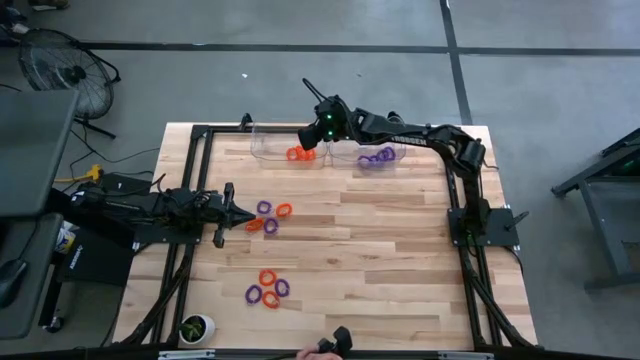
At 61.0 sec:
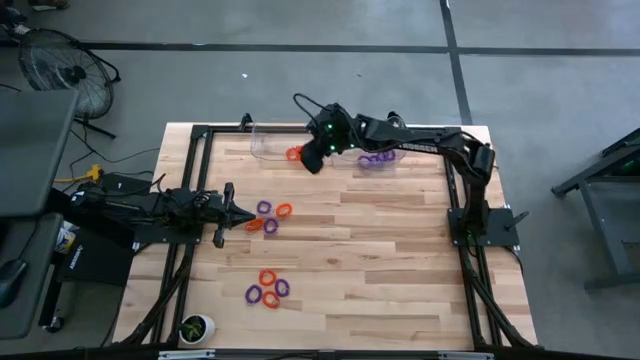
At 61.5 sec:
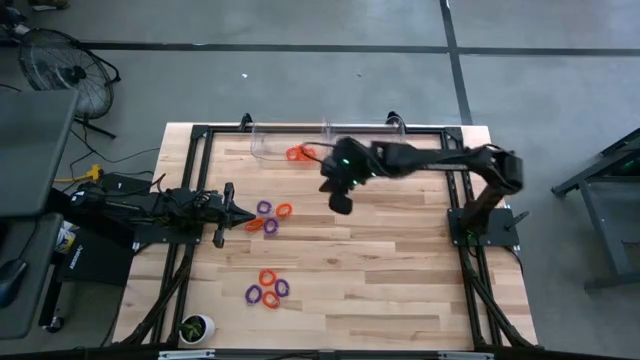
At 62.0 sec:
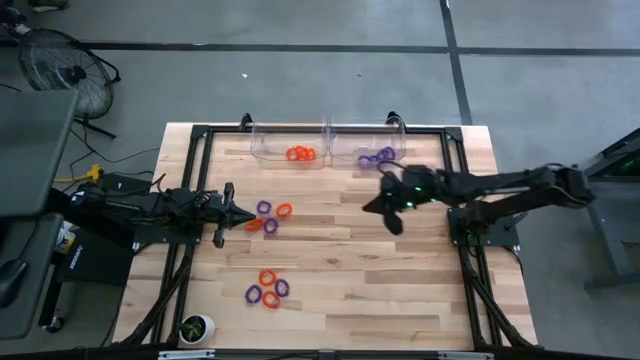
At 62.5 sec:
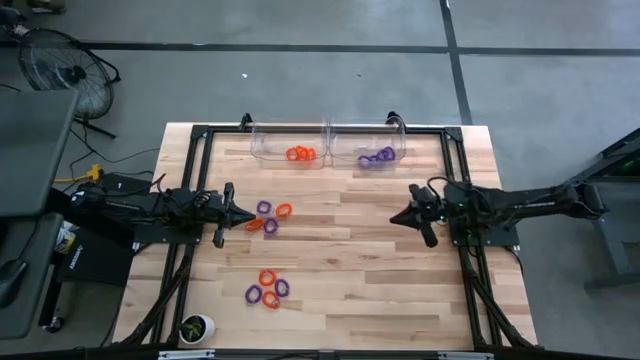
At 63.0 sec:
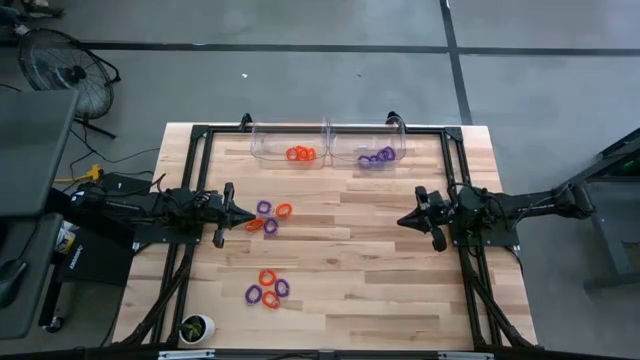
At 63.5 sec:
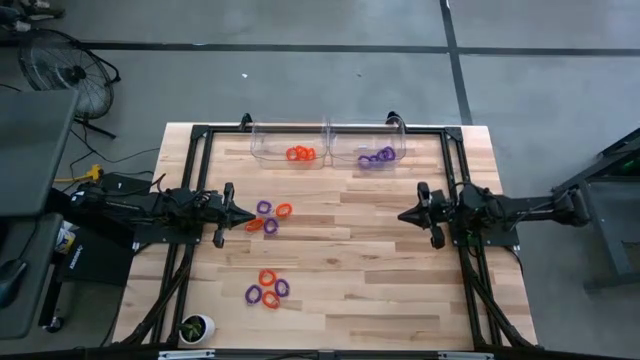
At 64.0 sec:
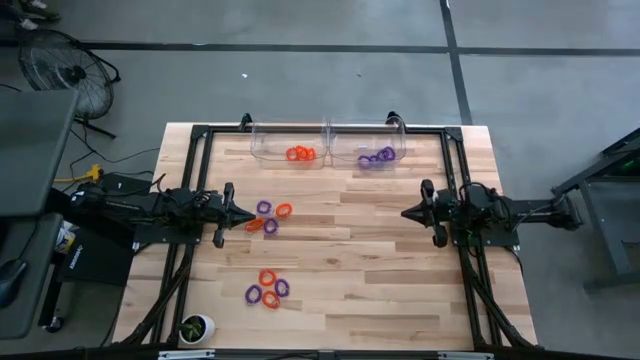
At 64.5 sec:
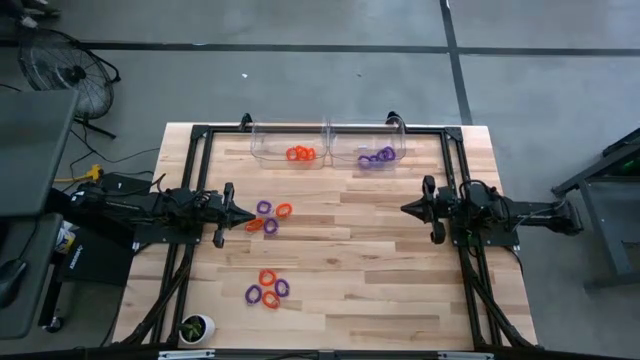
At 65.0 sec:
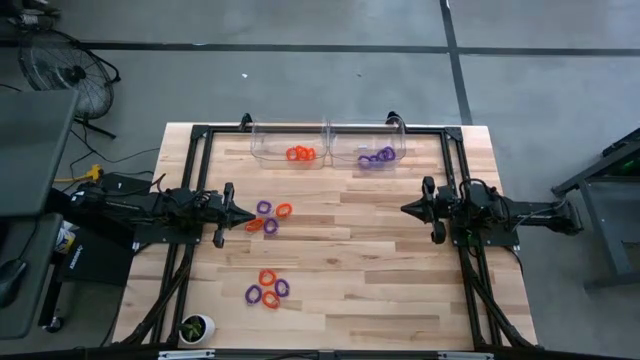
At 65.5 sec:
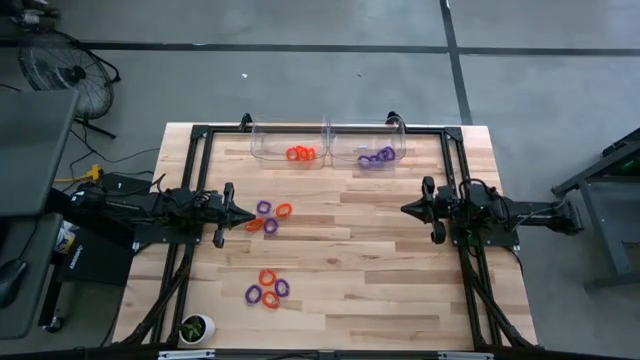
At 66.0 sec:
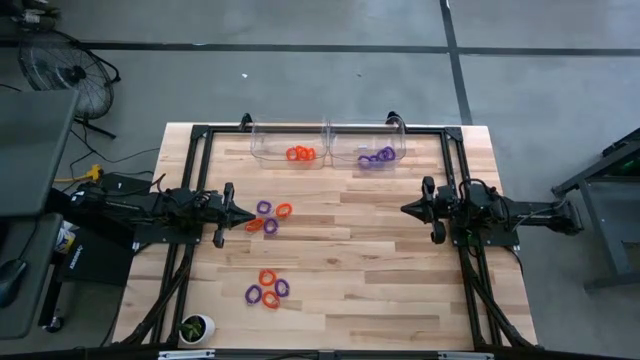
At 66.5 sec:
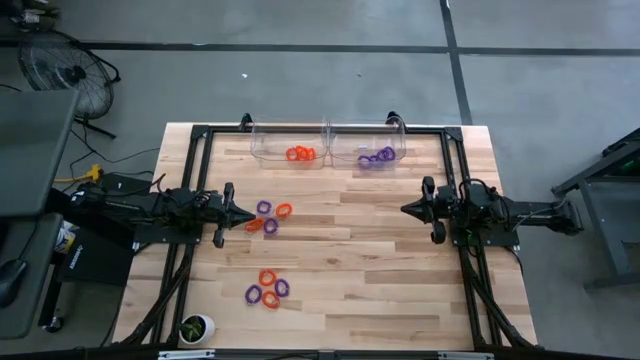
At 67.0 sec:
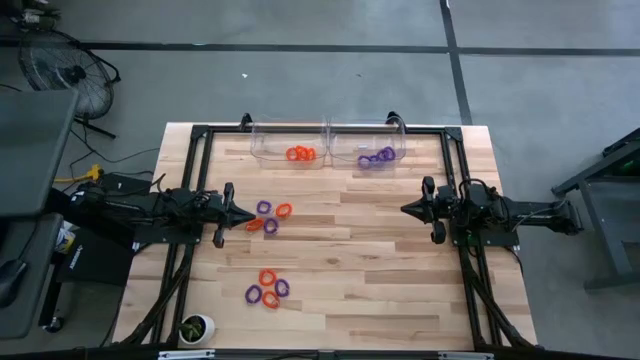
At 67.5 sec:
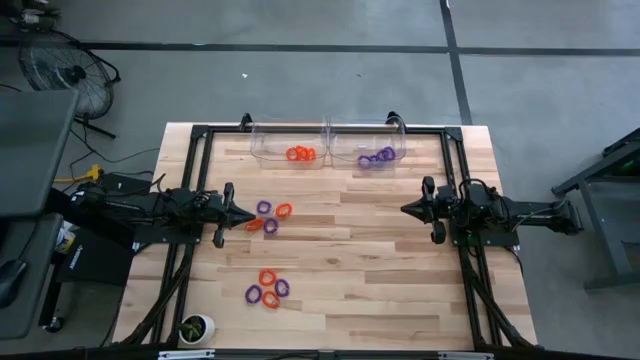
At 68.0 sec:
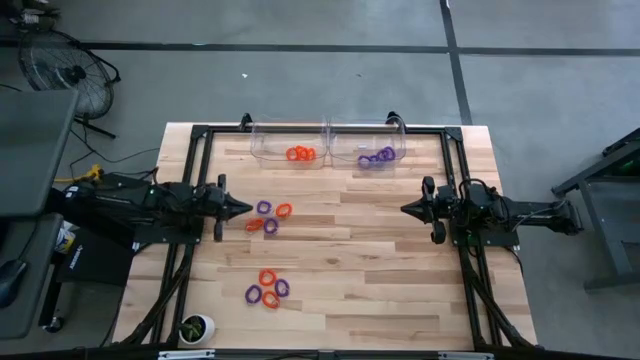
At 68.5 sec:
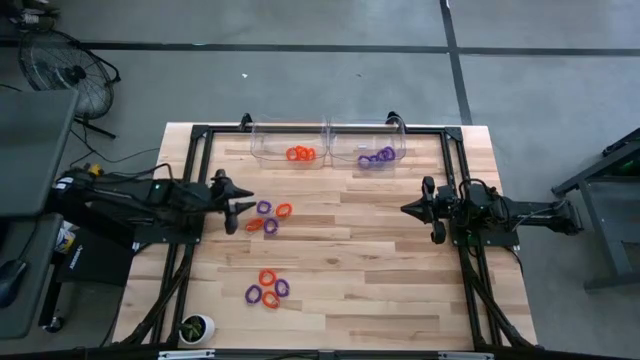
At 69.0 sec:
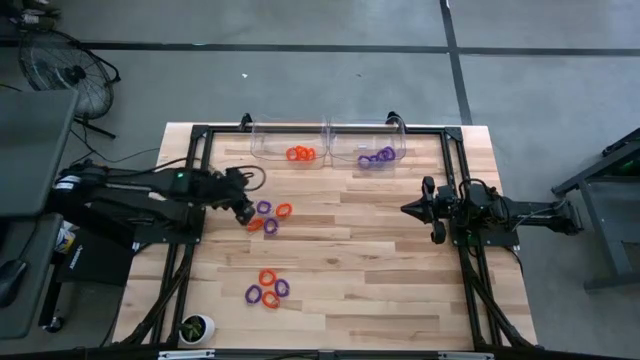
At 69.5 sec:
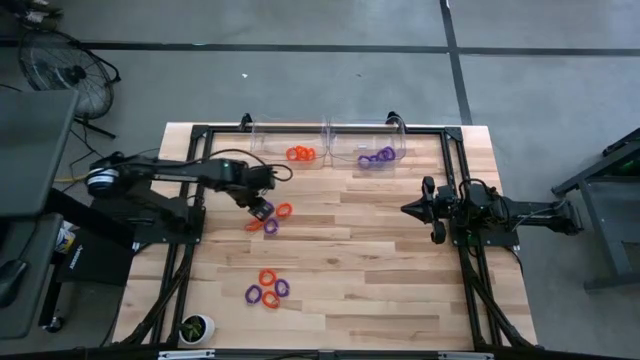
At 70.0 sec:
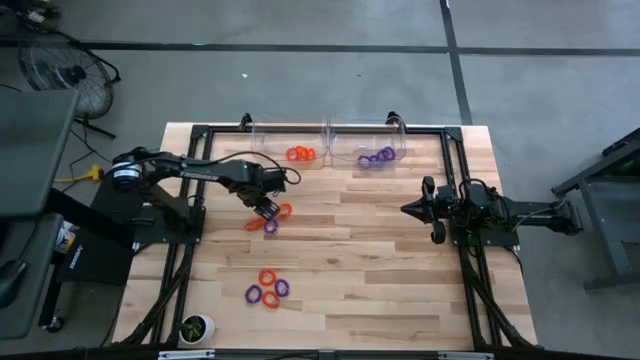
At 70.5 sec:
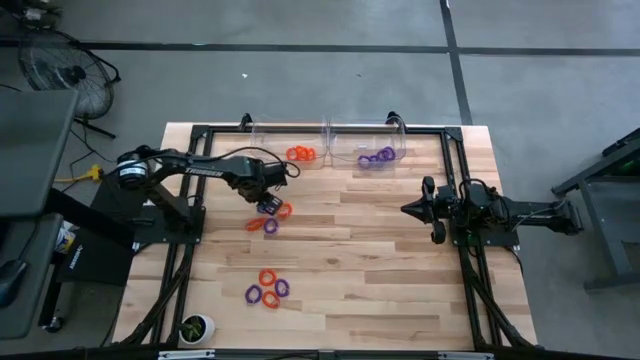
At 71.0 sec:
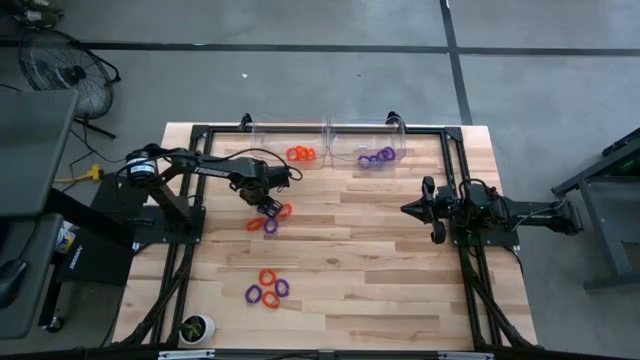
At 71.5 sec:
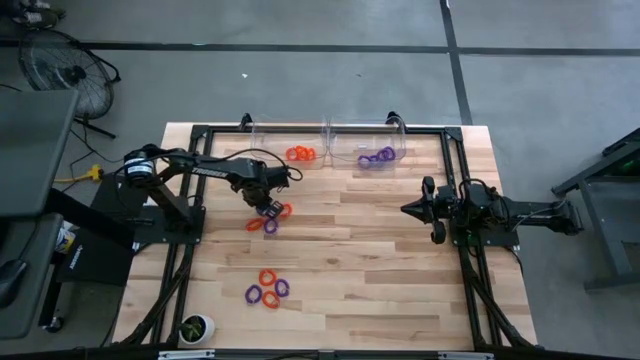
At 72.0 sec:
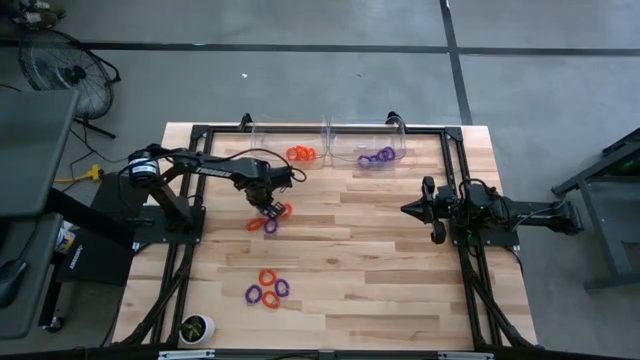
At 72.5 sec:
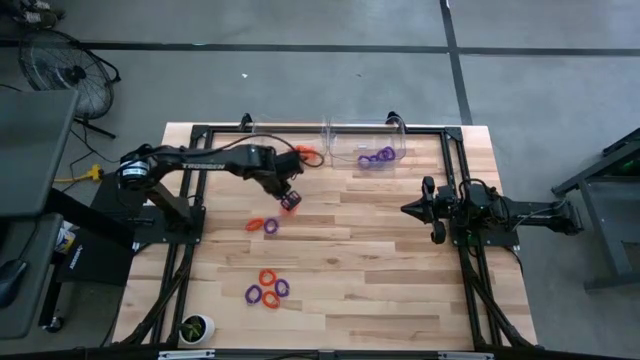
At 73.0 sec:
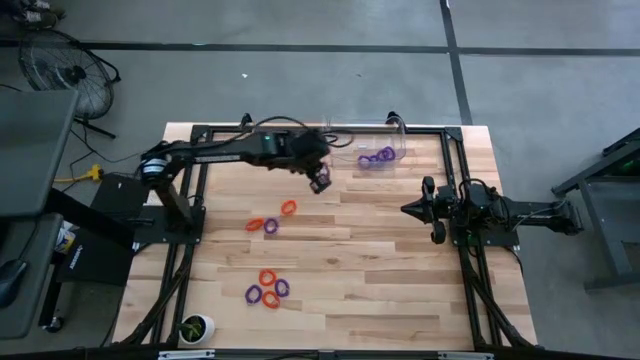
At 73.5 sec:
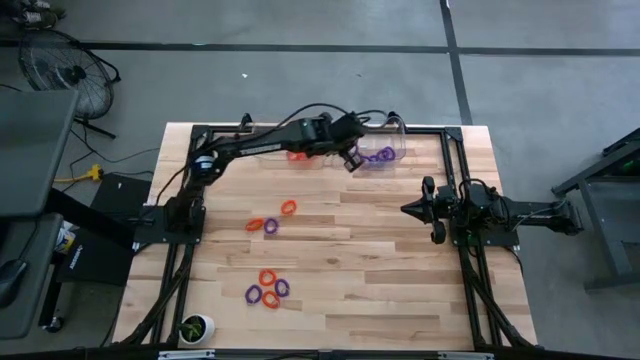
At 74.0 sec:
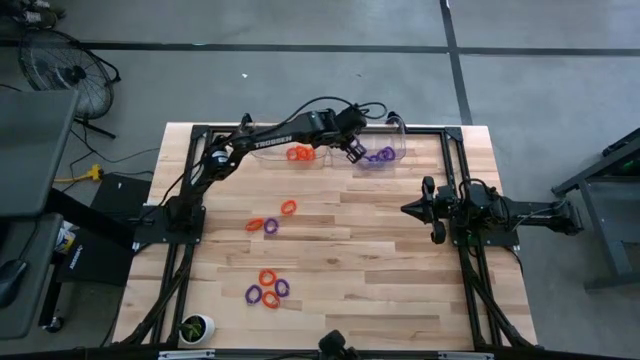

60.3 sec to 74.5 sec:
Task: Sort spring keychains
Put the violet spring keychain into the right transparent bin

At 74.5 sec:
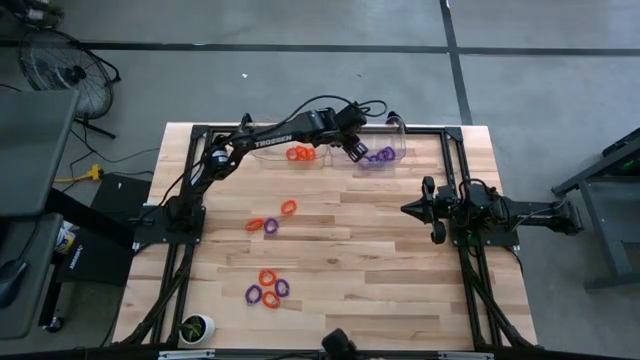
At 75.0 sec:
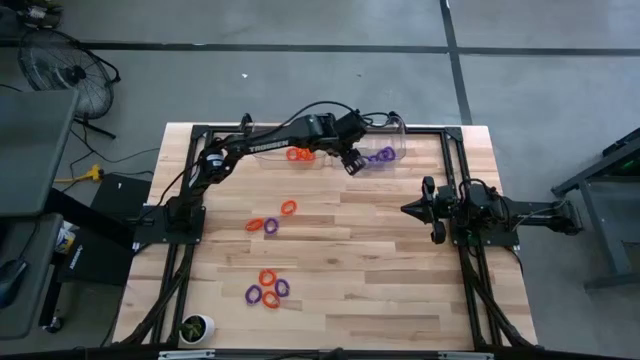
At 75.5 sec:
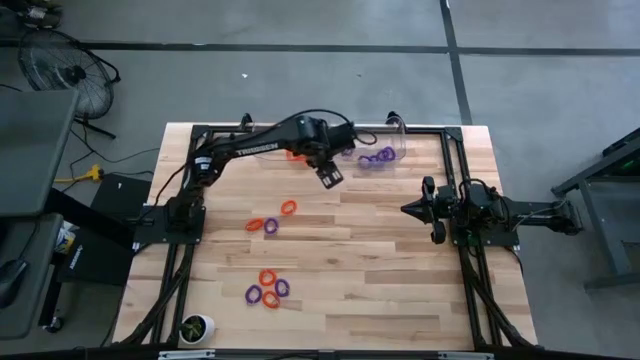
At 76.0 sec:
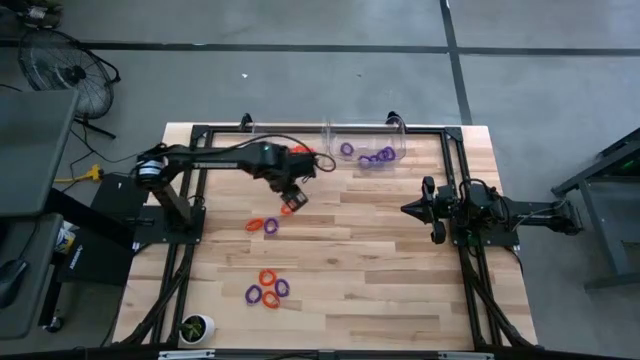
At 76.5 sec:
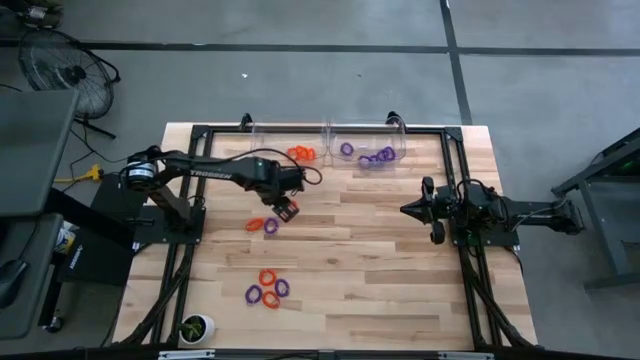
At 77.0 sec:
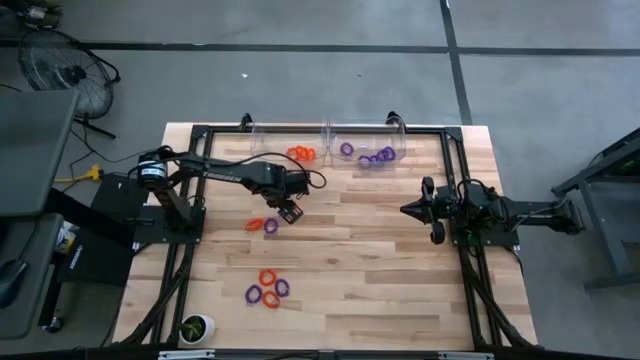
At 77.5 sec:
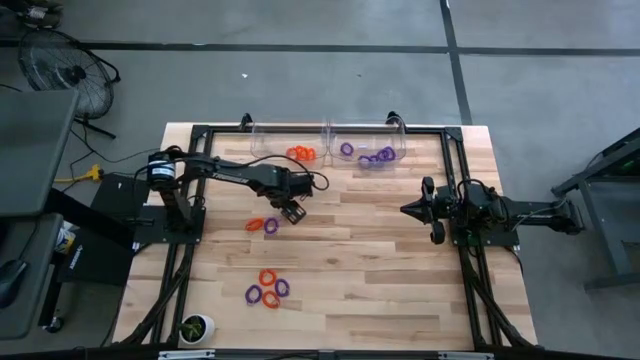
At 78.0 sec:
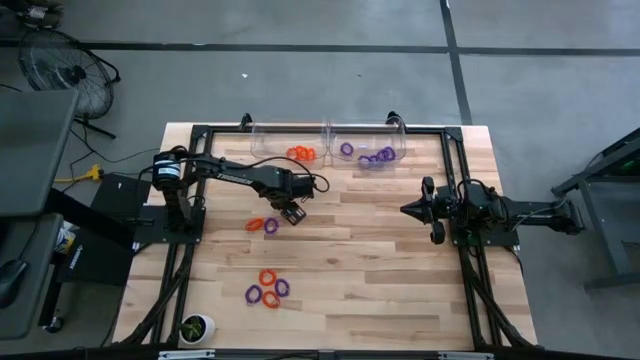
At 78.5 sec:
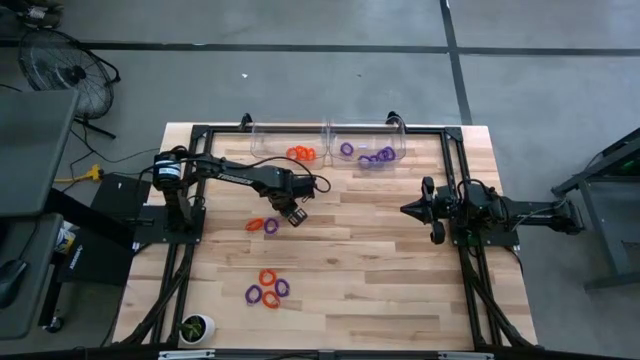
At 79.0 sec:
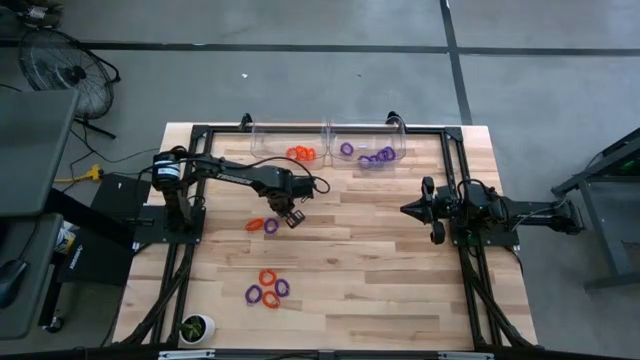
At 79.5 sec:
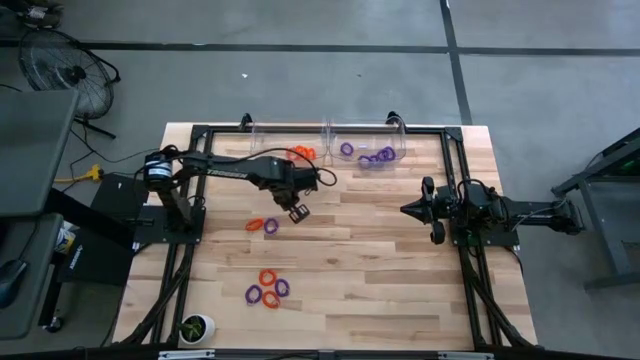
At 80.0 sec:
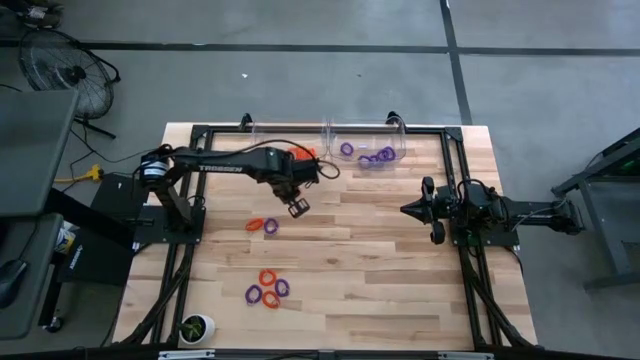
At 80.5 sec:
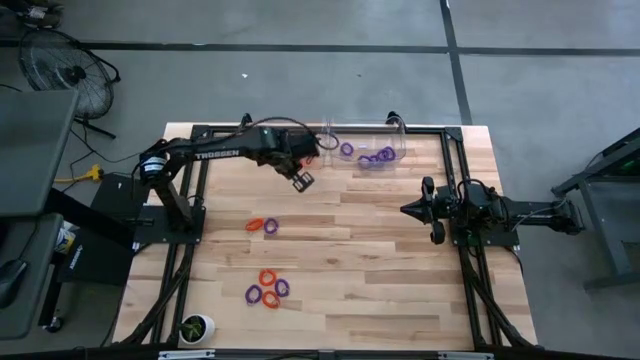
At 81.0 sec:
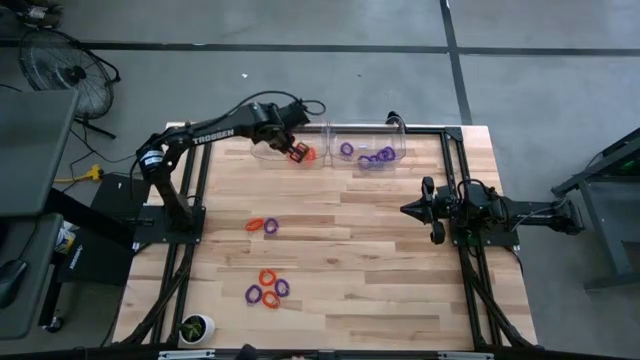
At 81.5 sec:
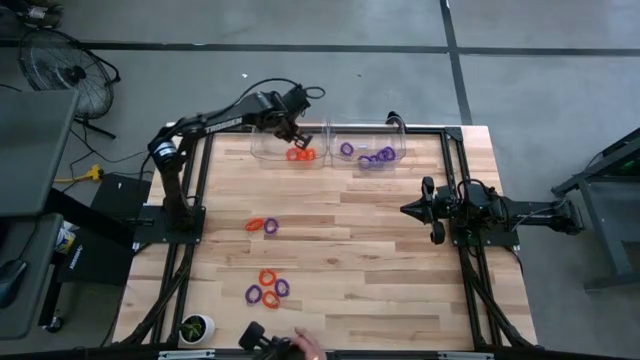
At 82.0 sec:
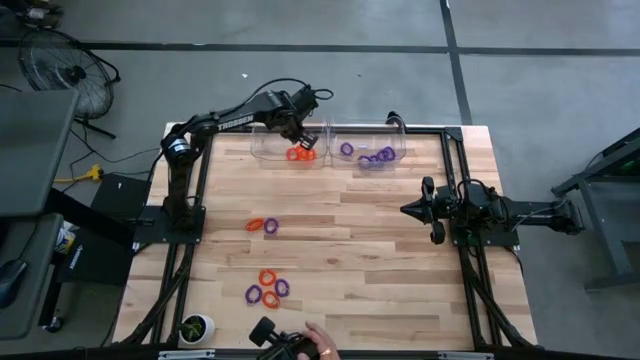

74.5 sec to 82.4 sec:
Put the orange spring keychain into the left transparent bin
